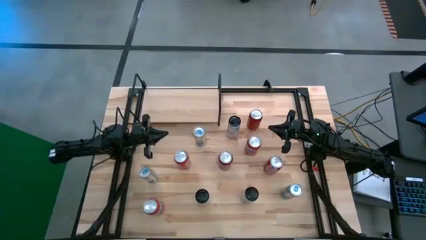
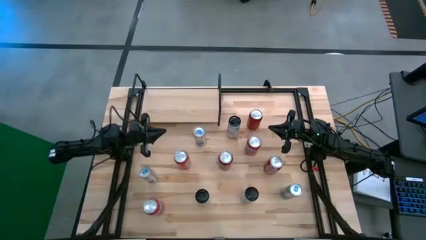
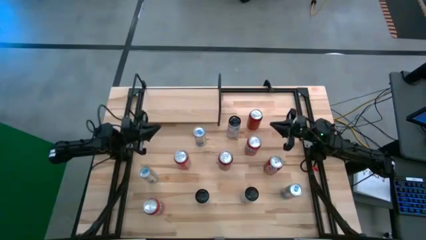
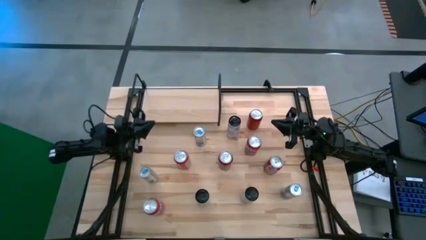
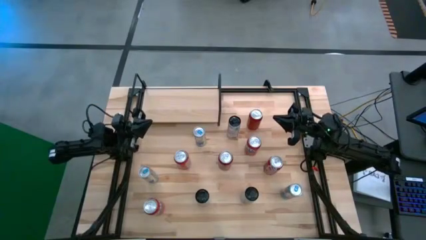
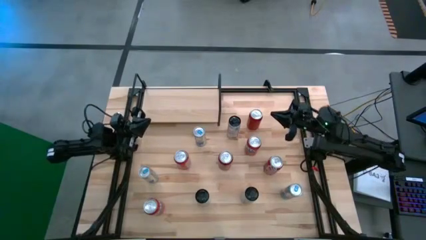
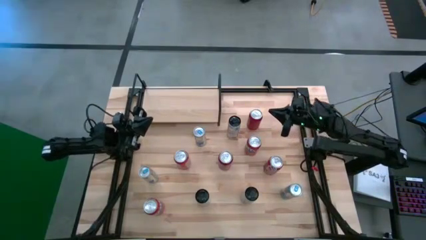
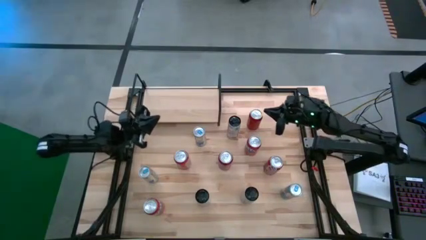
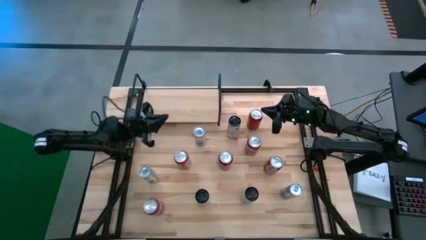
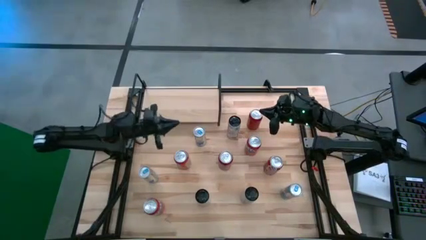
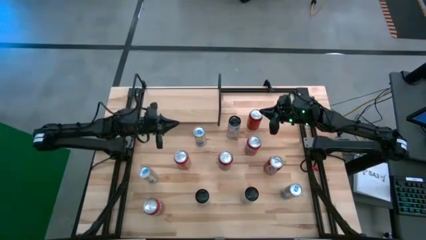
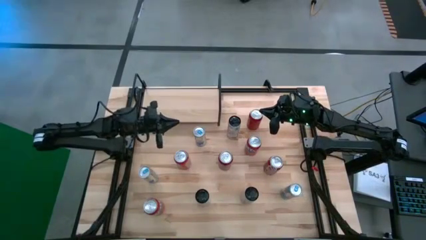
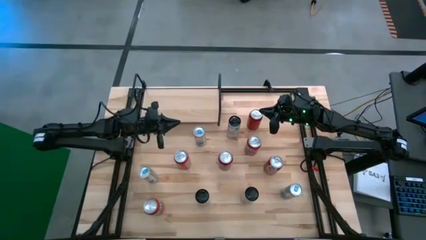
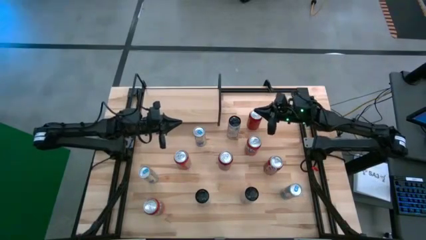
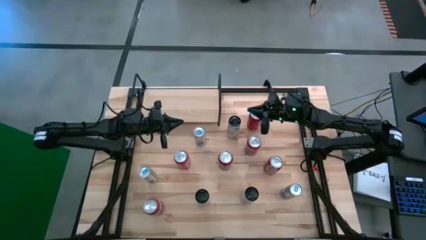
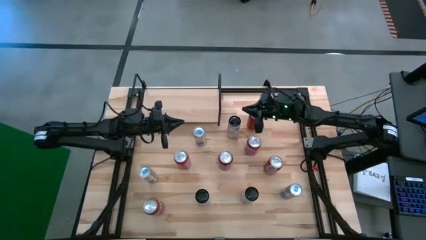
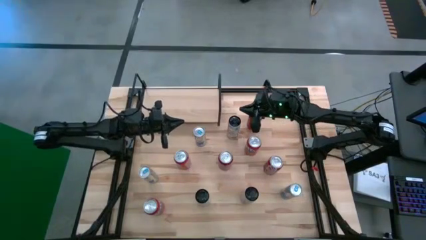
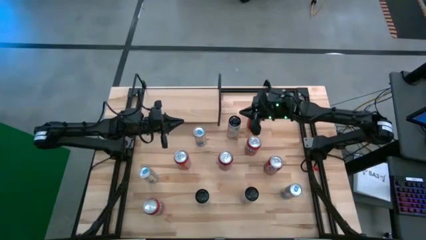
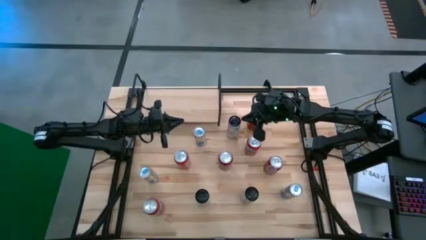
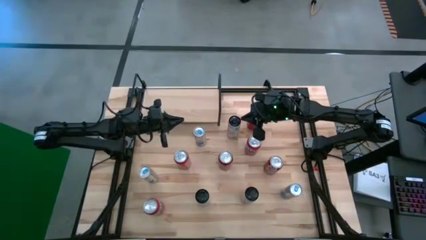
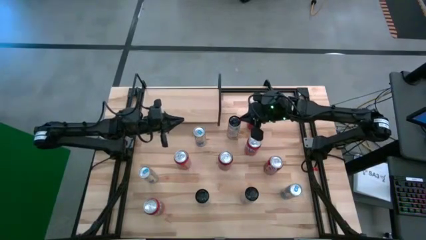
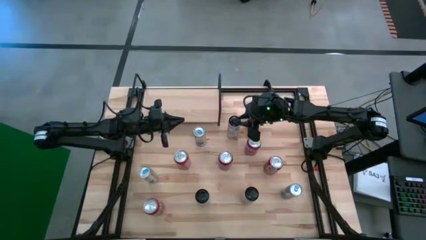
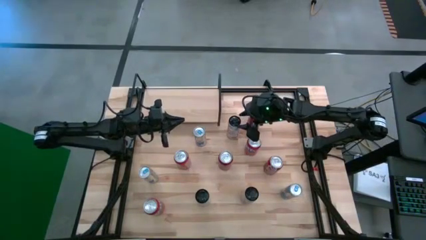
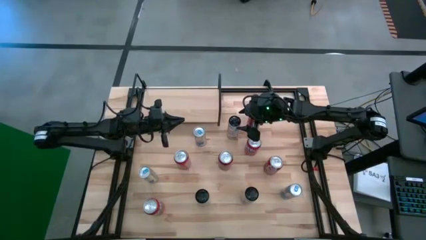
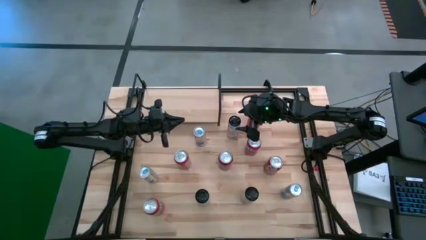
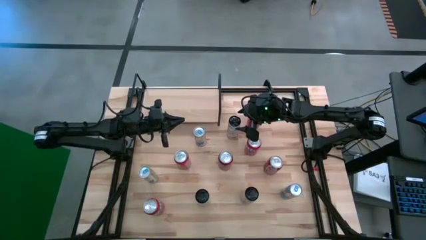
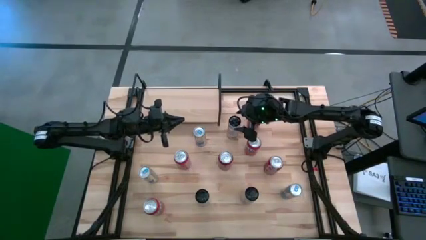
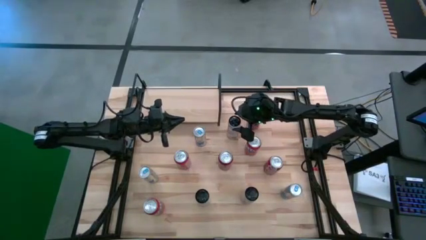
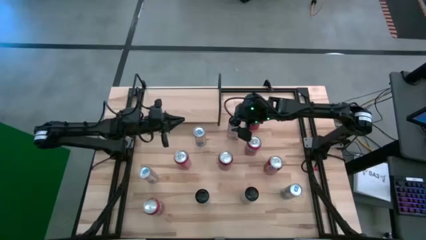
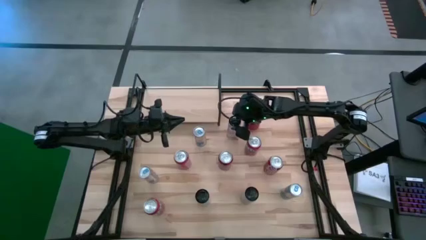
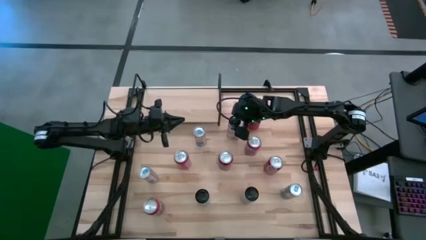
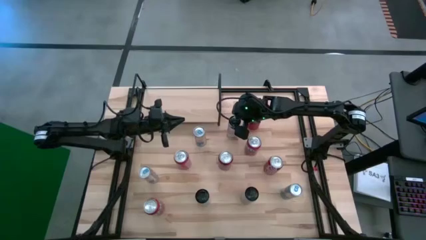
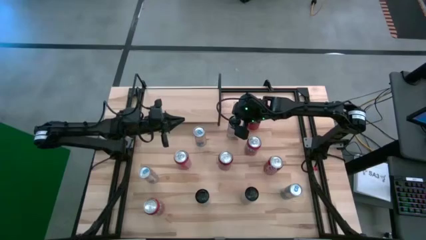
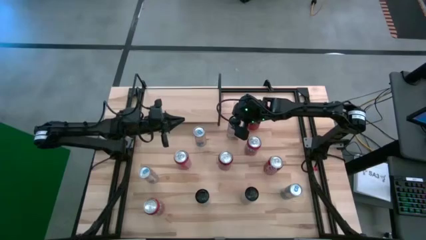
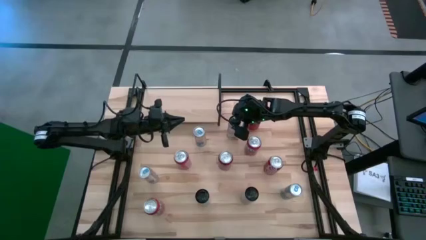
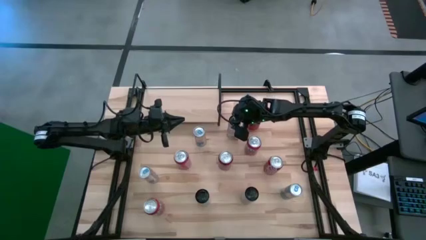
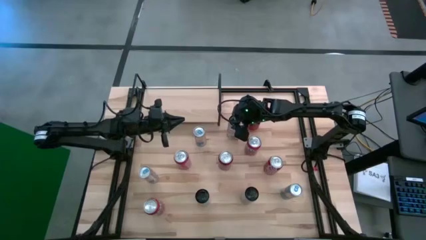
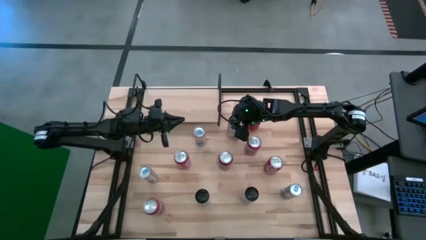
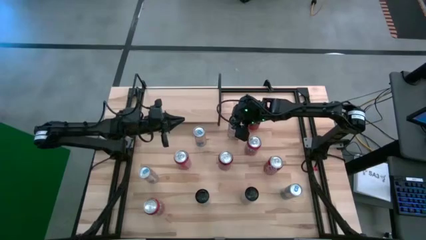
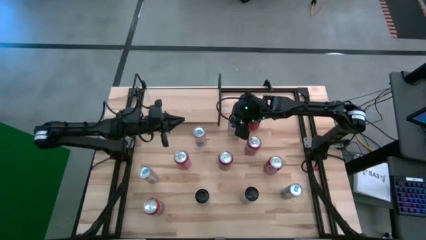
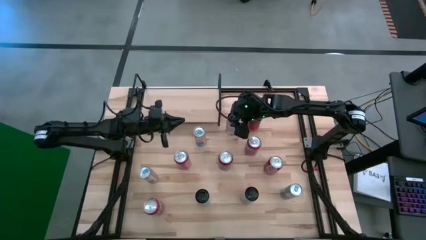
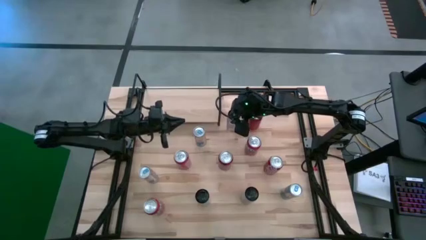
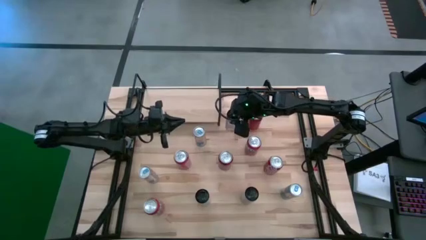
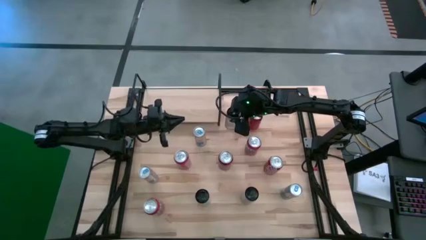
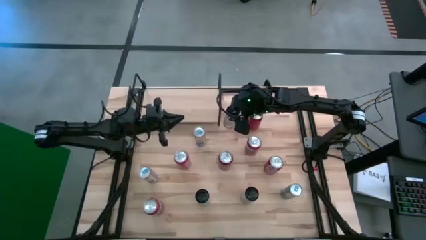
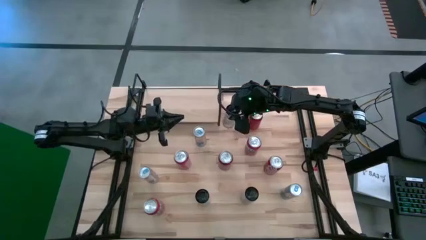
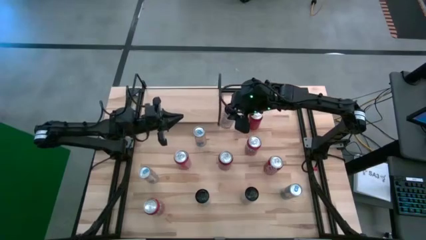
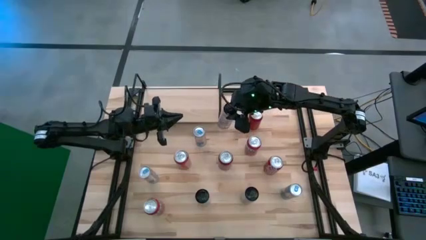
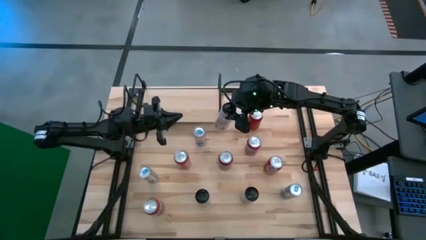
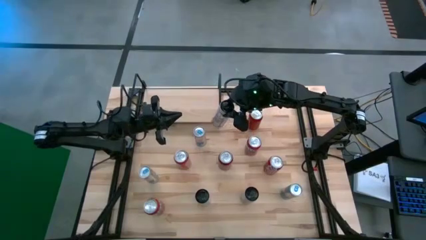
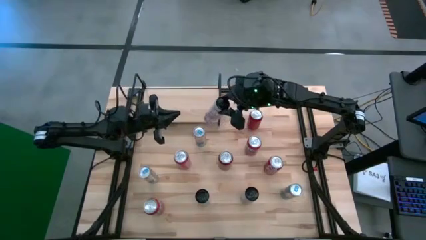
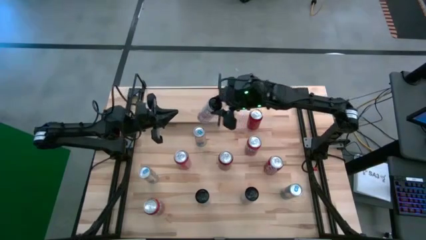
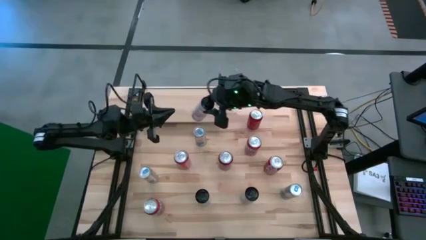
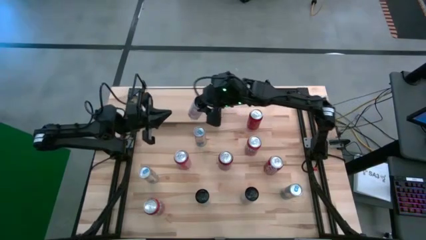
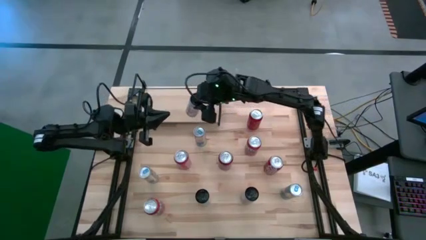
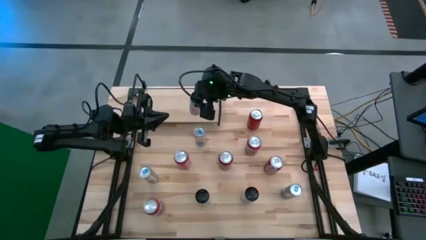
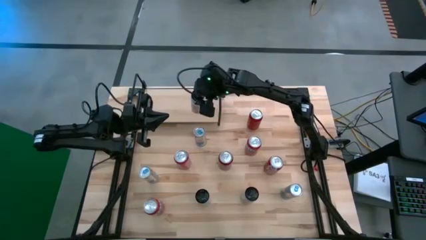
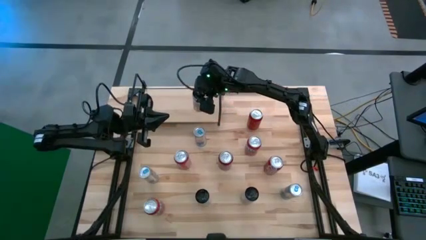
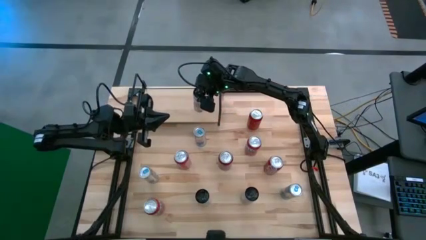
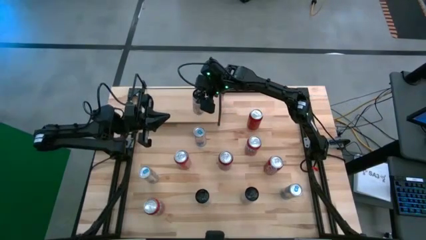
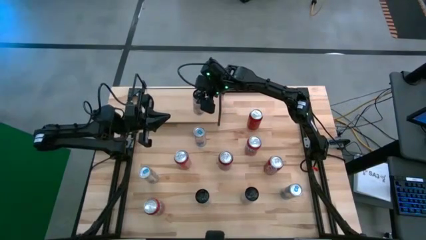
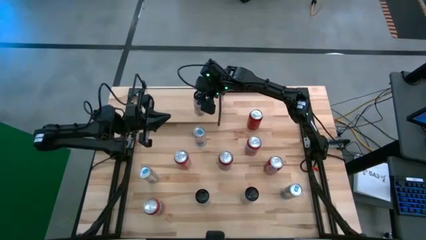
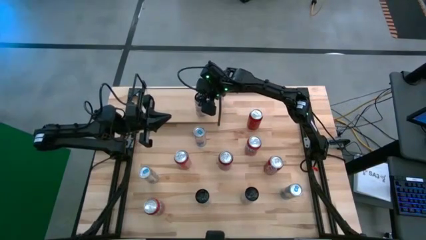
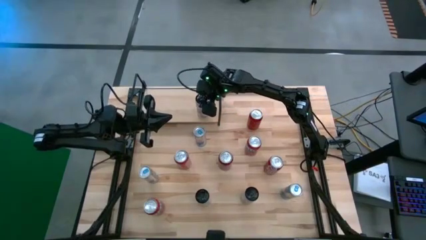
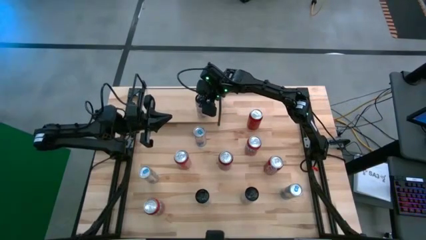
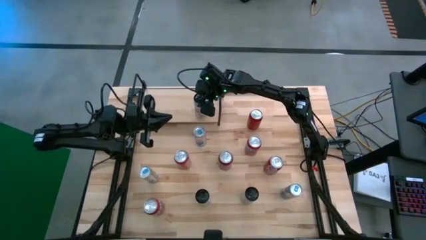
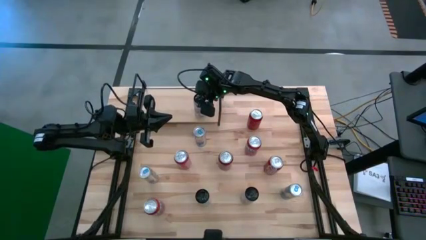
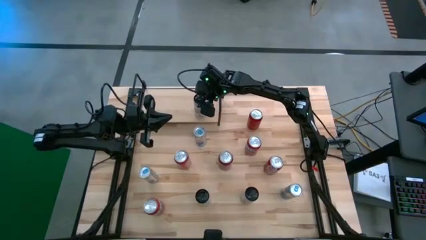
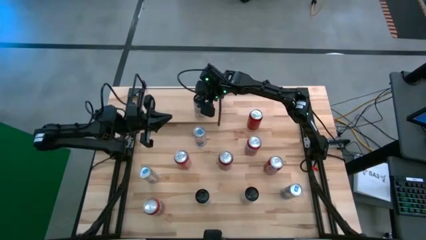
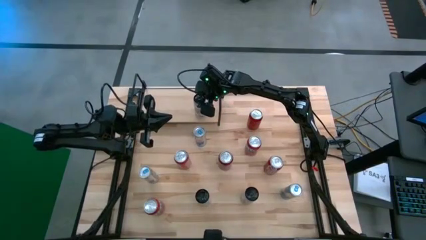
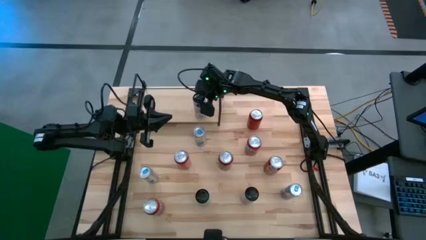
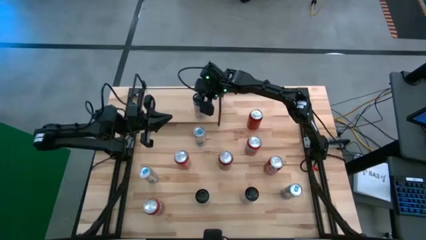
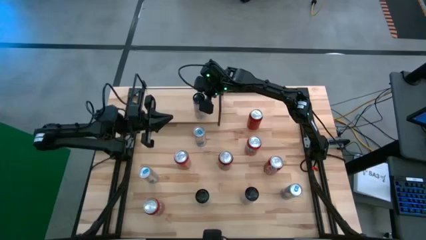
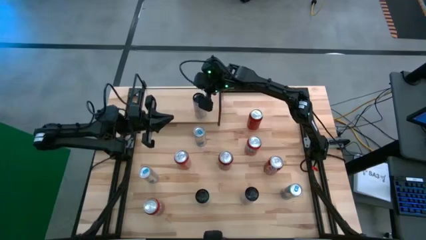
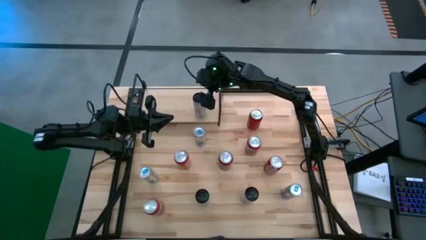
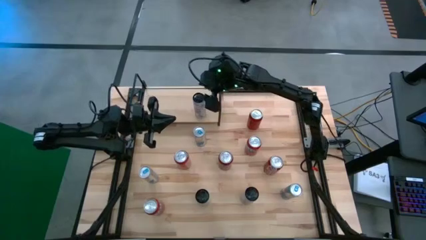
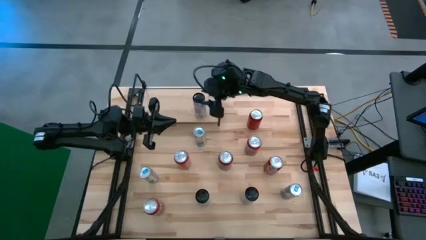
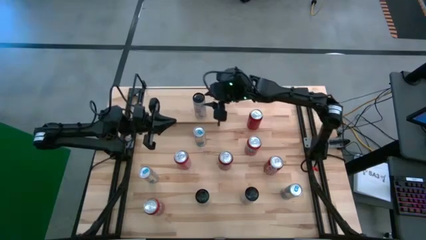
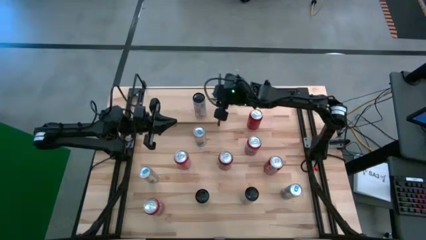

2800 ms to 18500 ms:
Task: Place canned beverage on shelf
Put the top white pink soda can on the shelf
